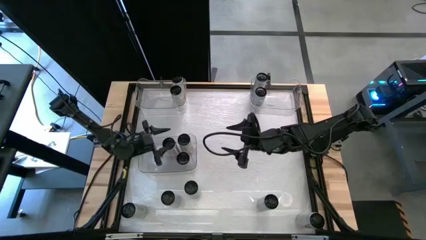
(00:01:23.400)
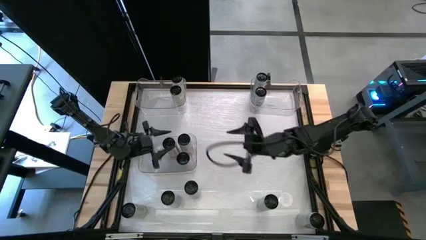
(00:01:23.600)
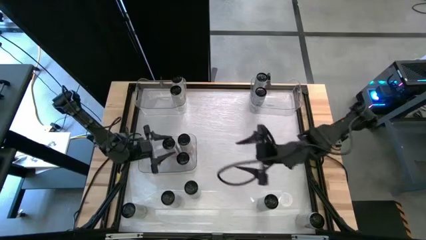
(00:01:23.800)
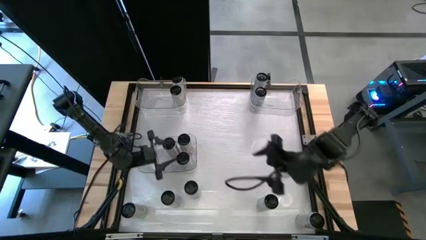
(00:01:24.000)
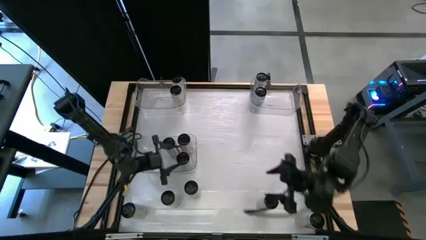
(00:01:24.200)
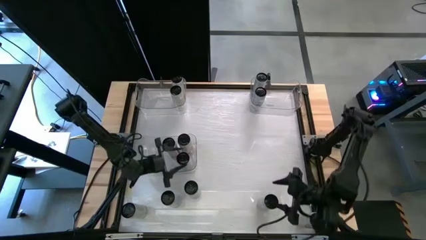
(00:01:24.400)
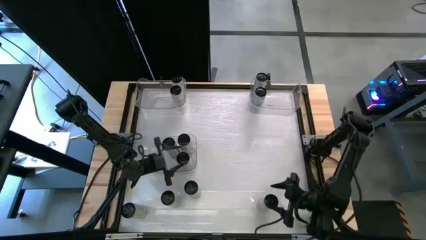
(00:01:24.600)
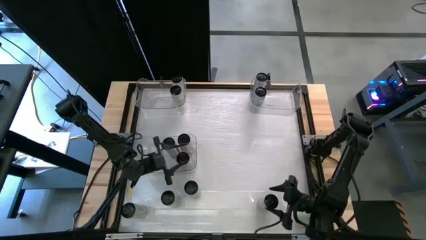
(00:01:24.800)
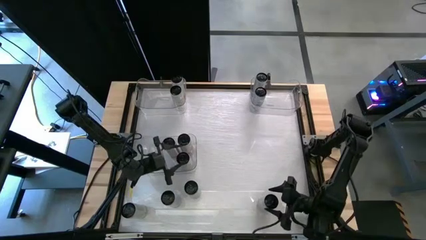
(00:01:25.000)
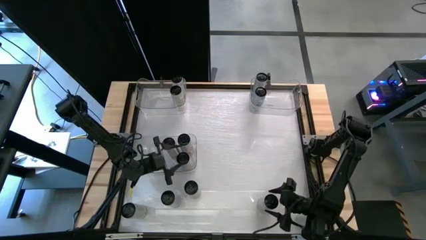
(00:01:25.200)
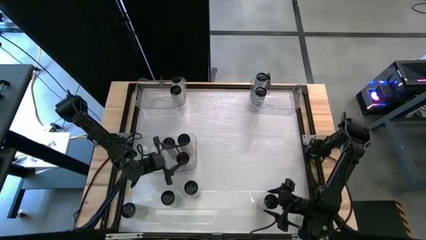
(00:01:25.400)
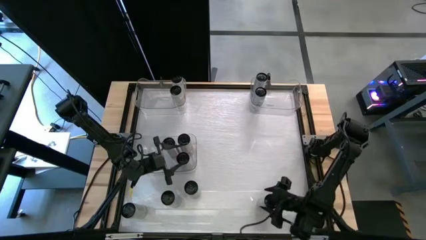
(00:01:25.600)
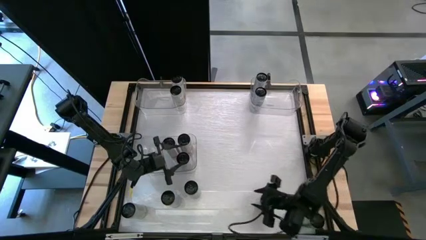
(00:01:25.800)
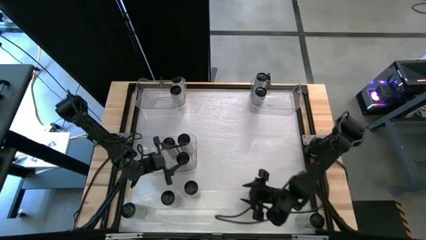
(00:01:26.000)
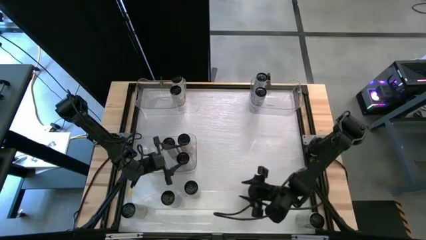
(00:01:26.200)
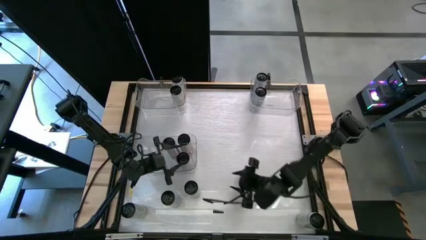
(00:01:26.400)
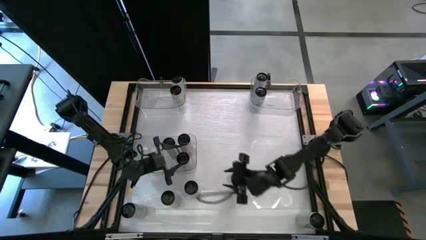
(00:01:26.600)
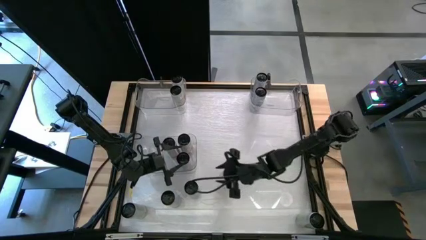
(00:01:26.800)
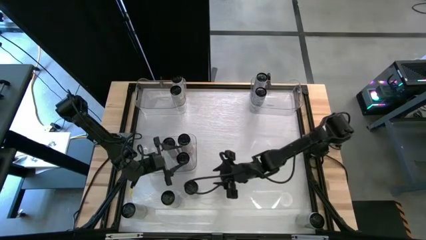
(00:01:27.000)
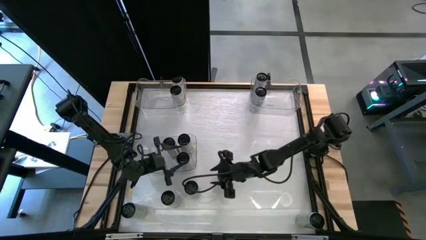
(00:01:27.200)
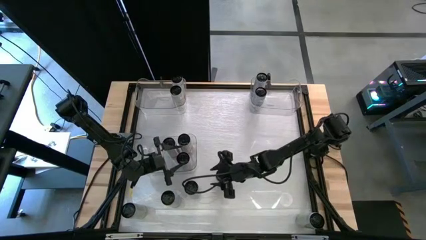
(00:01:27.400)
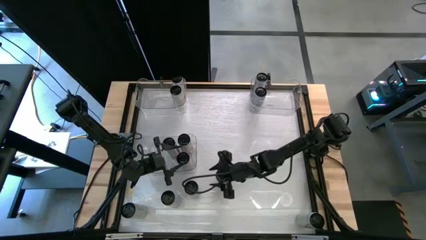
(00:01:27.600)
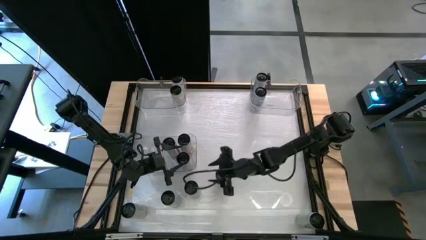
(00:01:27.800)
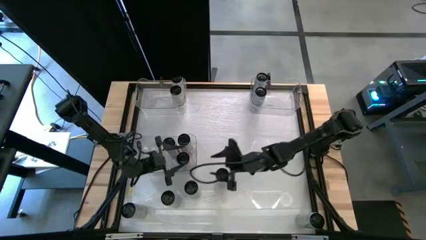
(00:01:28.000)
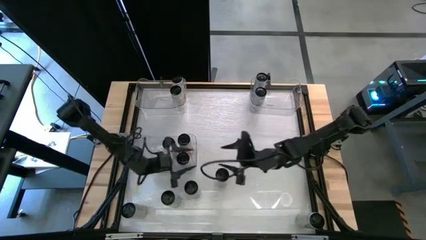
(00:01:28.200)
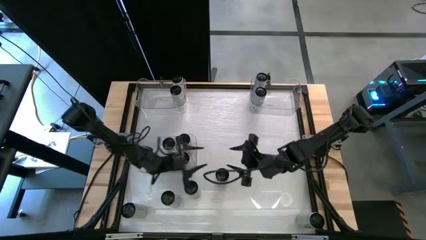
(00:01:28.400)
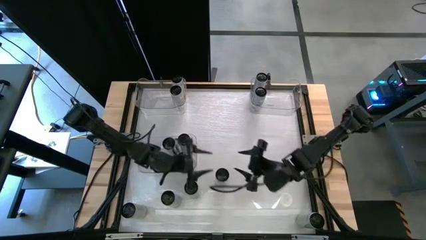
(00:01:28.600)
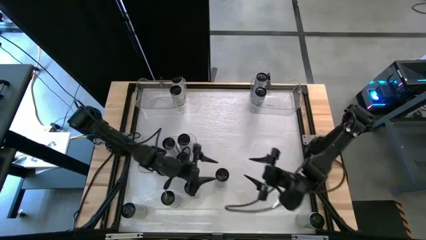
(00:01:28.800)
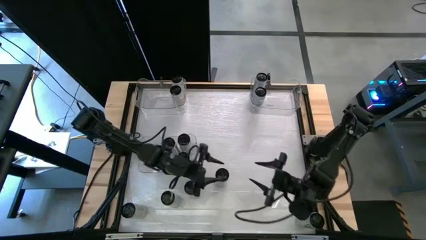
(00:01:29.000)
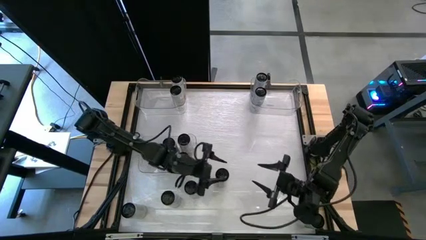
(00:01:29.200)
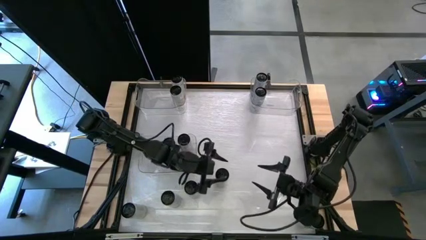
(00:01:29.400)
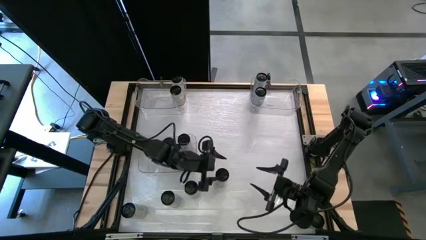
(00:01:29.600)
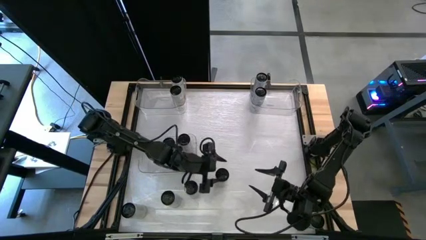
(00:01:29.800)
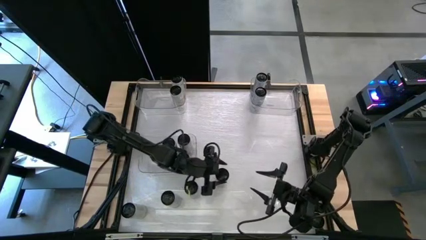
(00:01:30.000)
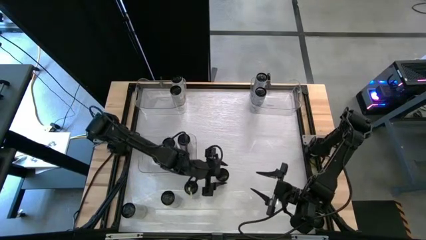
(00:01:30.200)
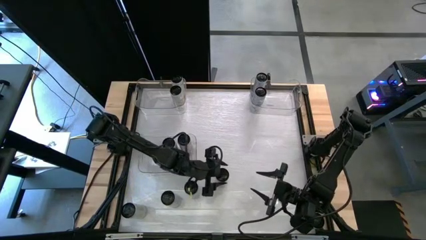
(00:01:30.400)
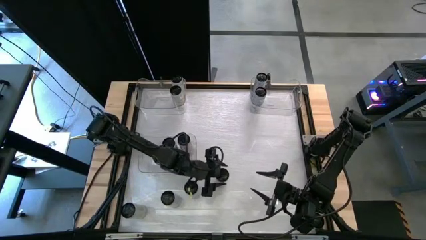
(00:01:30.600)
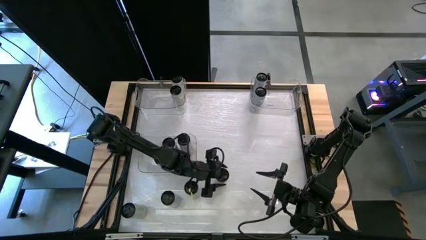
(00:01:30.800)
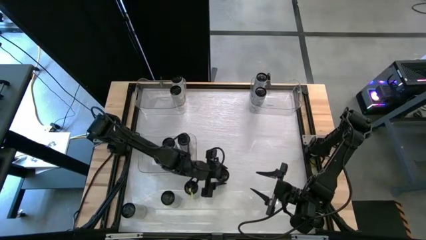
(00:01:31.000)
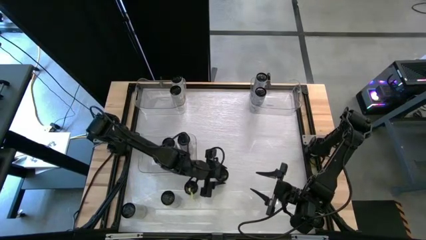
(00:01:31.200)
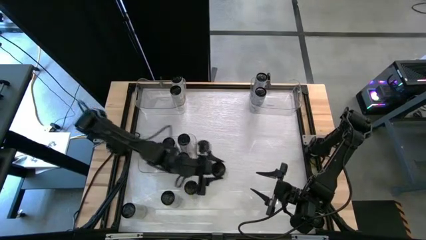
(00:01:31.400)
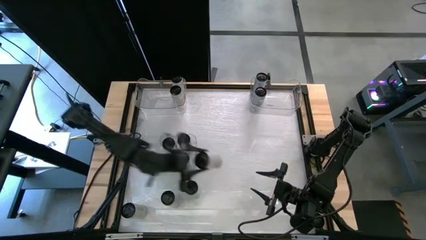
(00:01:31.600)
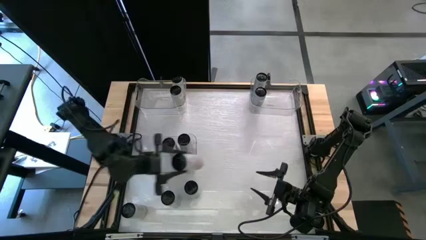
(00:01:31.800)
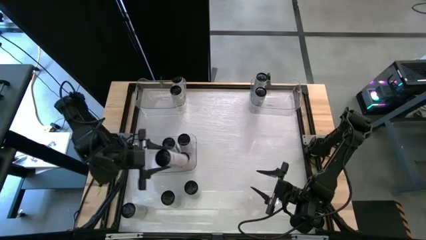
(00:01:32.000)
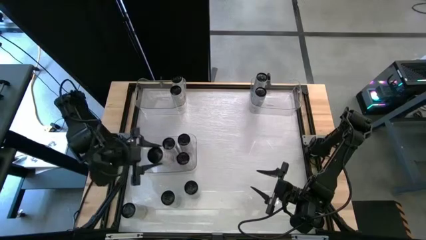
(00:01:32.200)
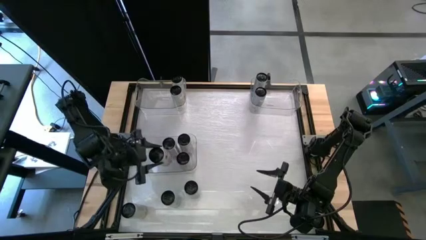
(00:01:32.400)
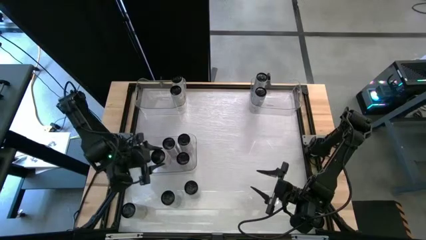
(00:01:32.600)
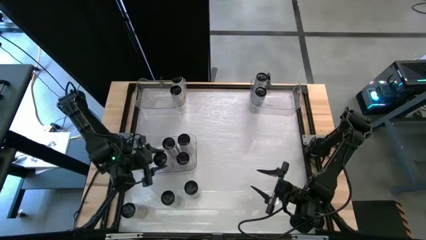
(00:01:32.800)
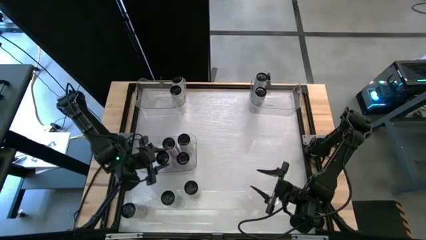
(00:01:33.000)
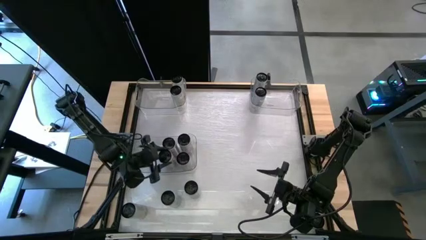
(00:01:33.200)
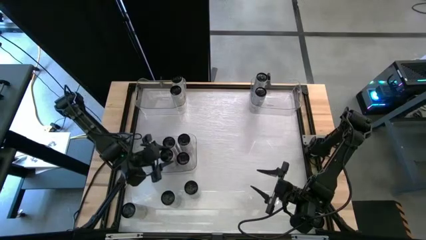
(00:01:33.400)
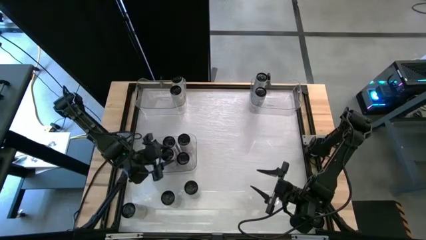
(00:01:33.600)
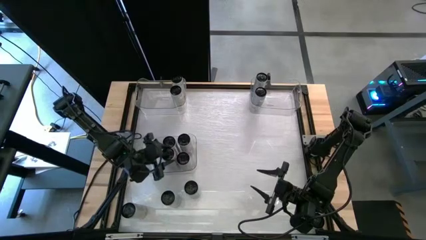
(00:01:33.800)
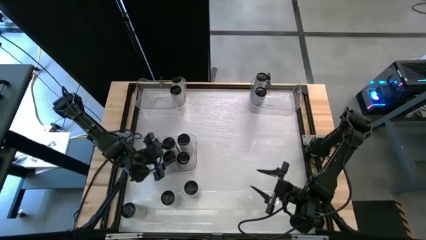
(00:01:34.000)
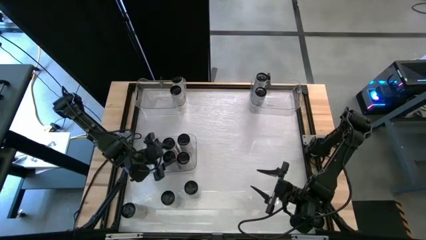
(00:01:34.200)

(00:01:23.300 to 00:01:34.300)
Task: Sort soda cans
Put the white-pink can into the bottom transparent bin

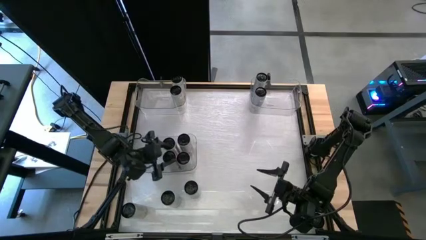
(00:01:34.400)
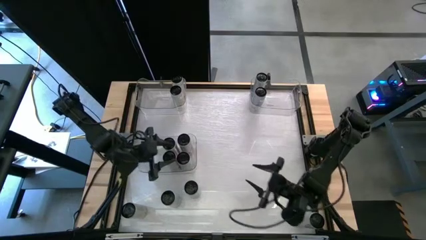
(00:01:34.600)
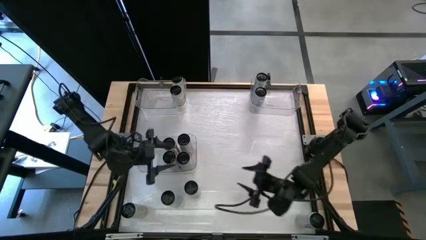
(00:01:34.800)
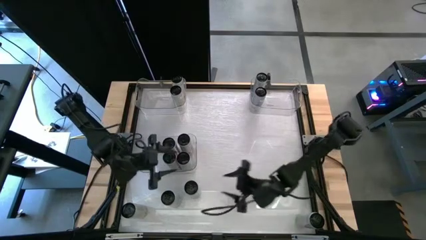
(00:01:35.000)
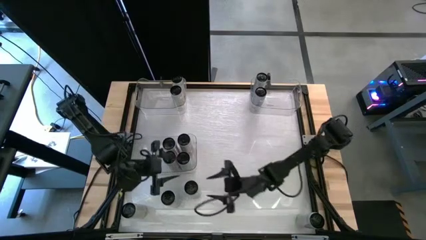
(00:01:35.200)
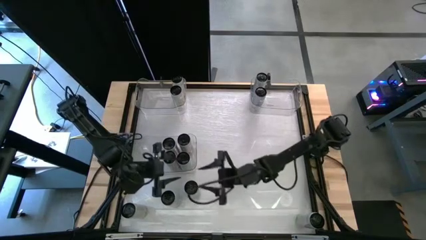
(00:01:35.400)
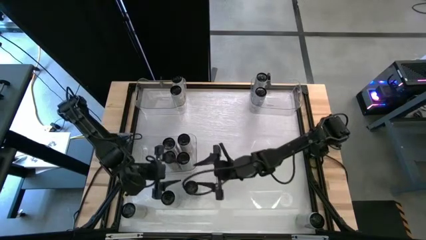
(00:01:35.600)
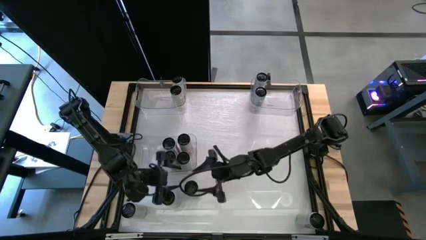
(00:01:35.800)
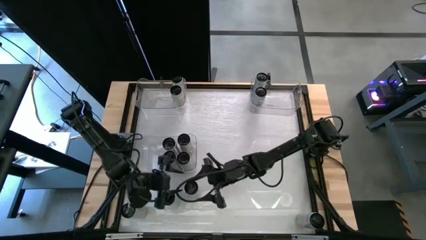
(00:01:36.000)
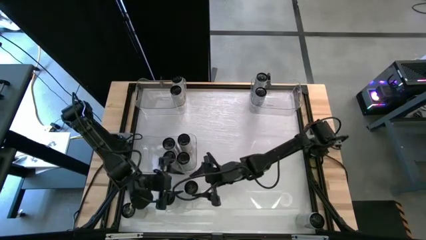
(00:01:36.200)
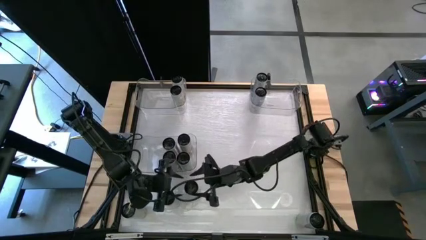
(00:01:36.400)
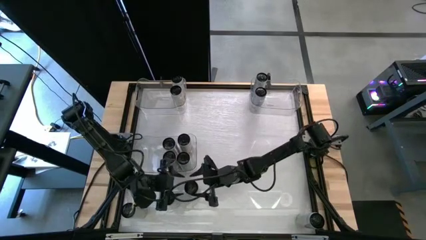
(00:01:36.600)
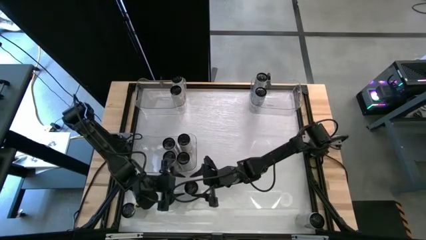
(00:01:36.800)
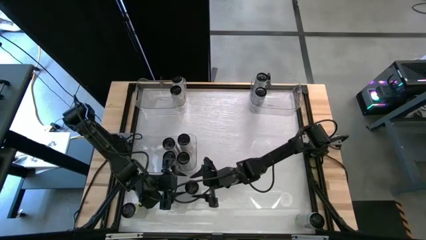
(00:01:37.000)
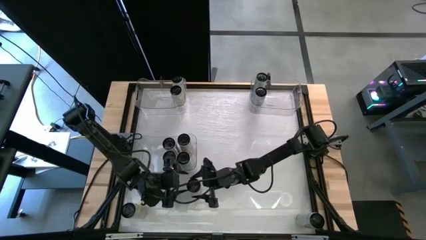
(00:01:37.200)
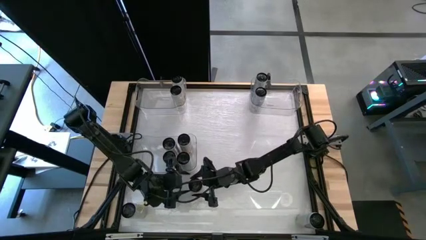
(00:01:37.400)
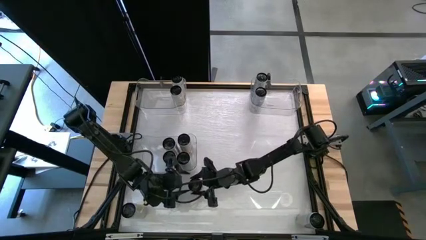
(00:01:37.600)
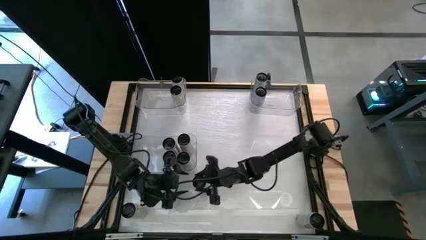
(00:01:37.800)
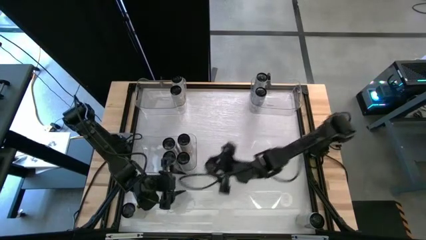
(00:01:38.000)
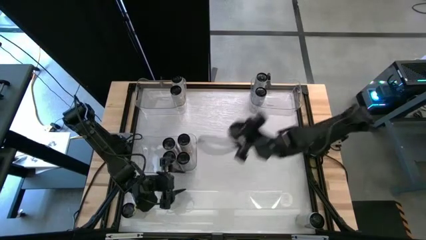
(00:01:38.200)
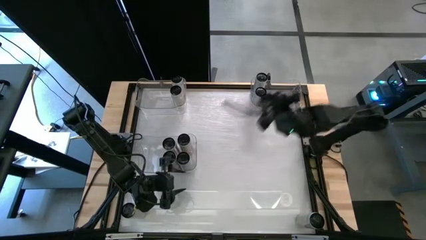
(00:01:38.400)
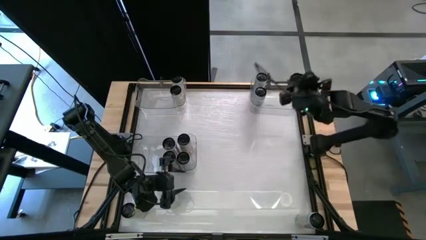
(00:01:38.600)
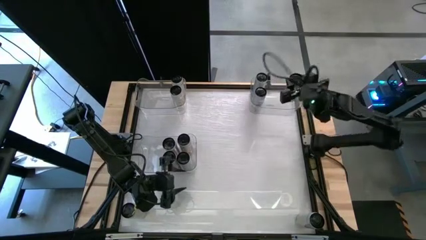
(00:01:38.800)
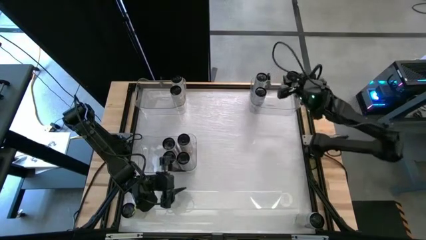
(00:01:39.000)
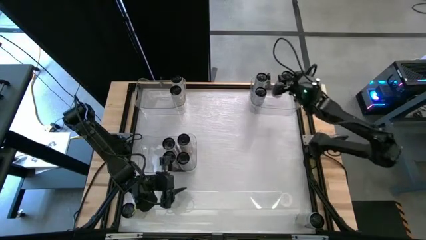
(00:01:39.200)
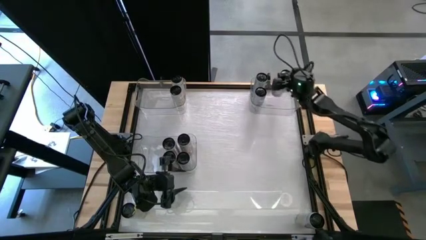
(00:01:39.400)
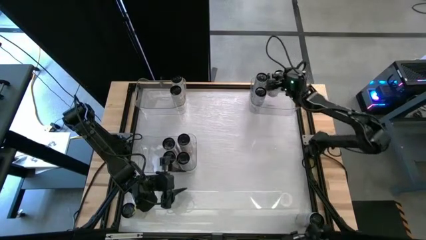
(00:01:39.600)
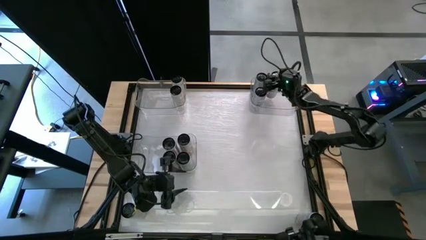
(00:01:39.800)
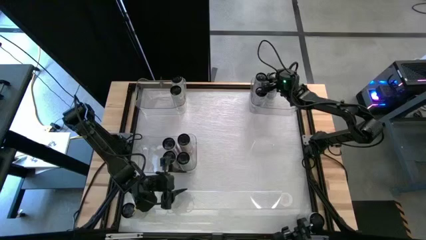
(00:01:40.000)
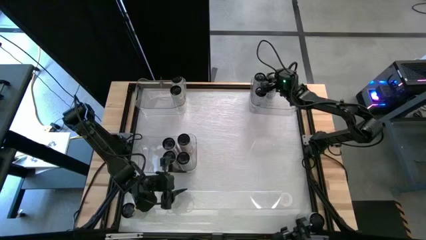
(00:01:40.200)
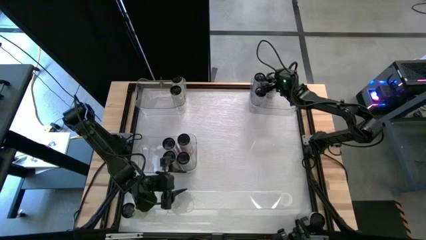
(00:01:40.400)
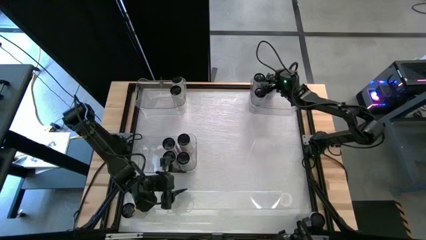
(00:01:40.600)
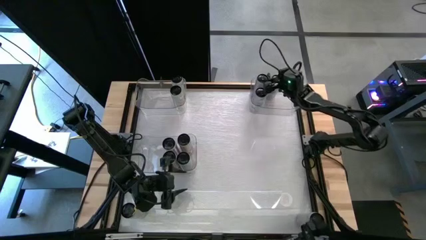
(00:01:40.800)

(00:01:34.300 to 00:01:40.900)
Put the white-blue can into the top right transparent bin
